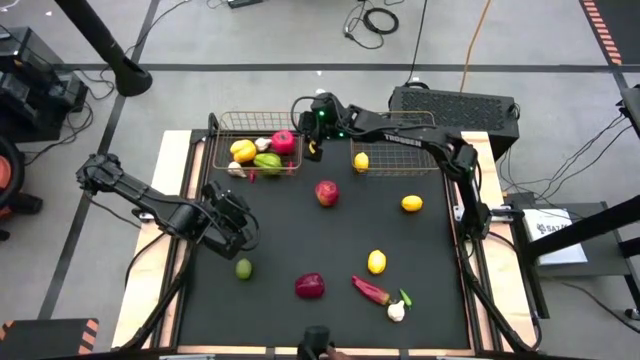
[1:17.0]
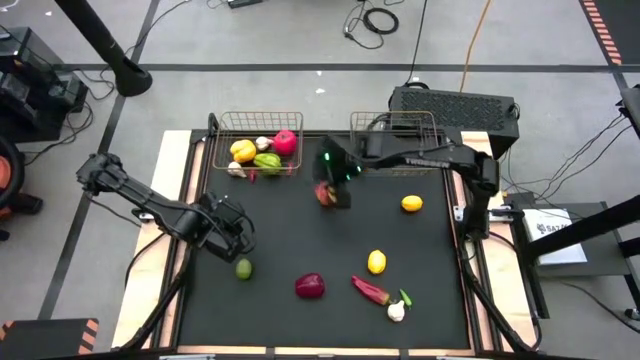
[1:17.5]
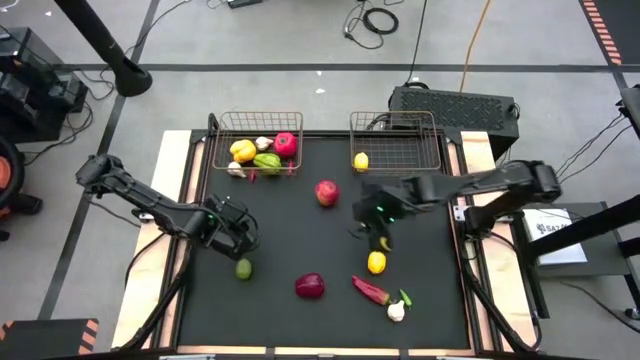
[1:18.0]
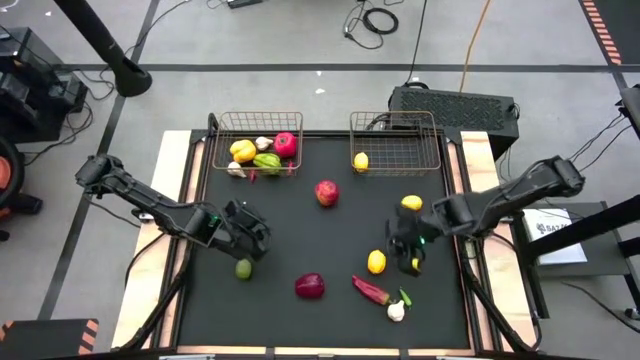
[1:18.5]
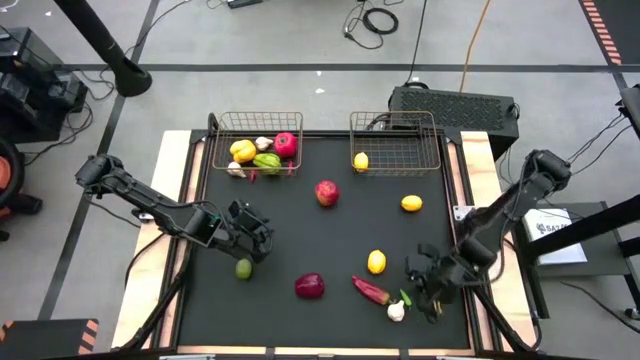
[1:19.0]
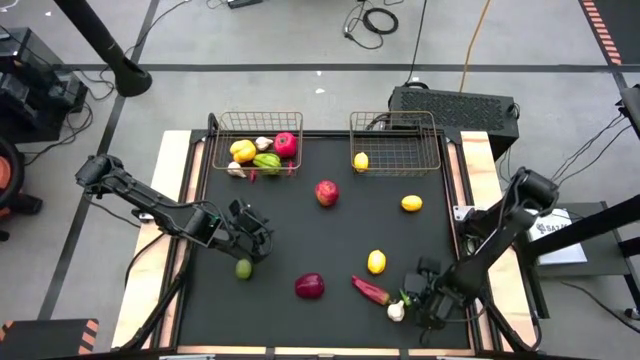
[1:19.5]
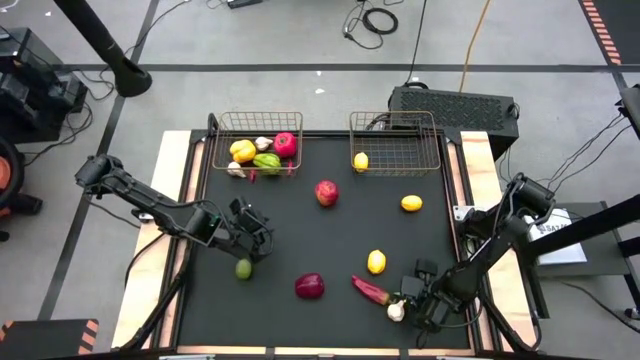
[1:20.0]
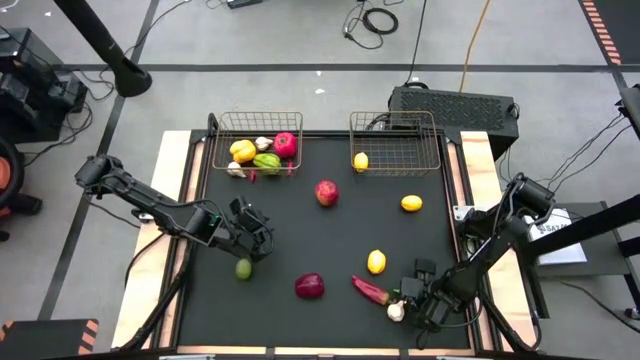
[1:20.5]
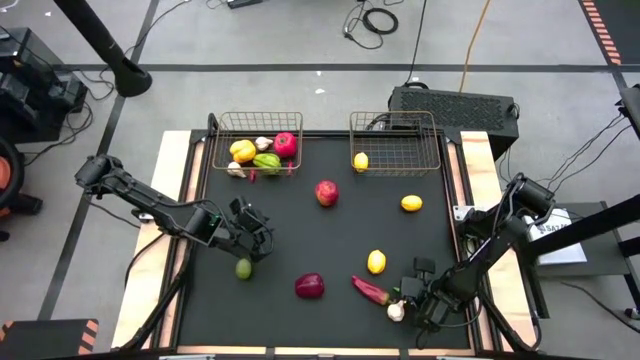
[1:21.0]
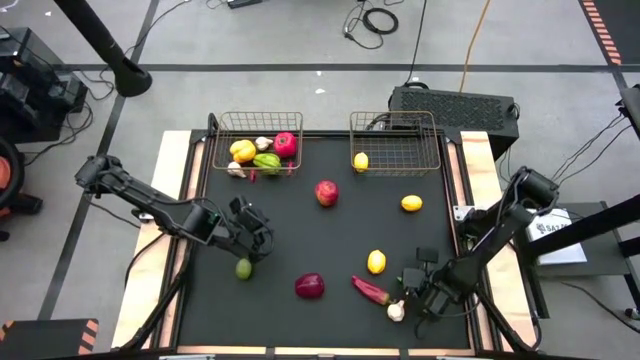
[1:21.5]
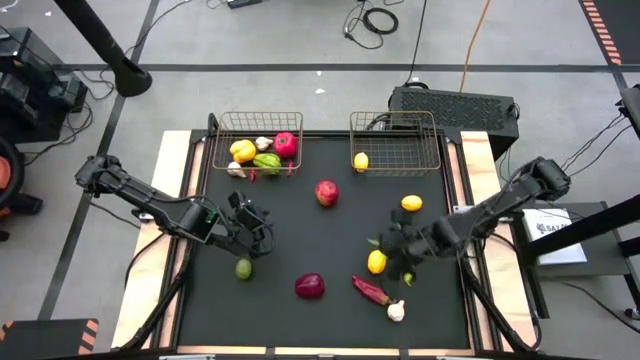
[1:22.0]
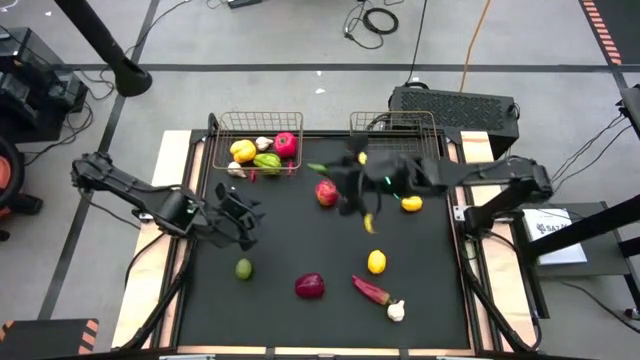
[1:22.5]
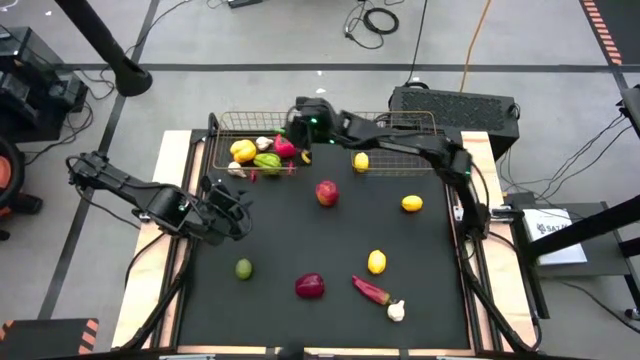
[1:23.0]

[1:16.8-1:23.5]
Task: Sort produce into baskets
Put the green chili pepper into the left wire basket

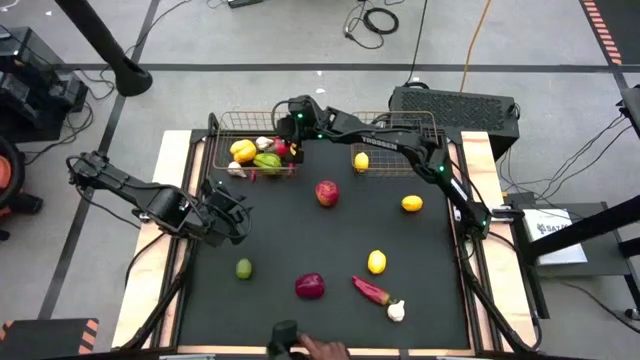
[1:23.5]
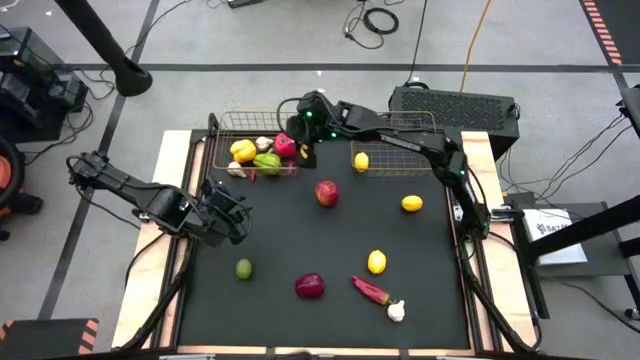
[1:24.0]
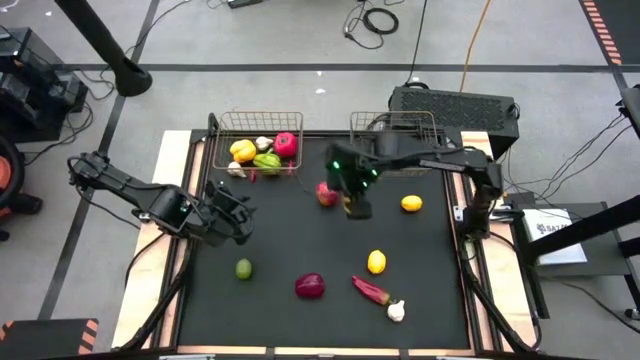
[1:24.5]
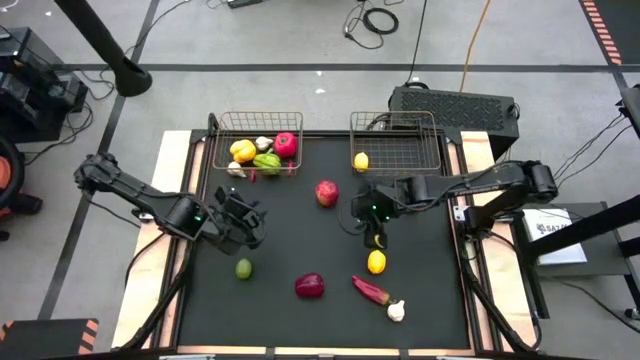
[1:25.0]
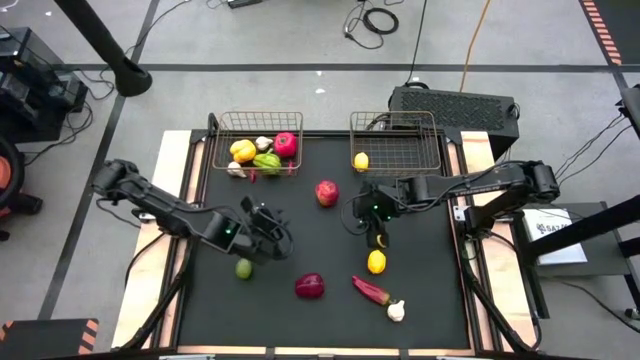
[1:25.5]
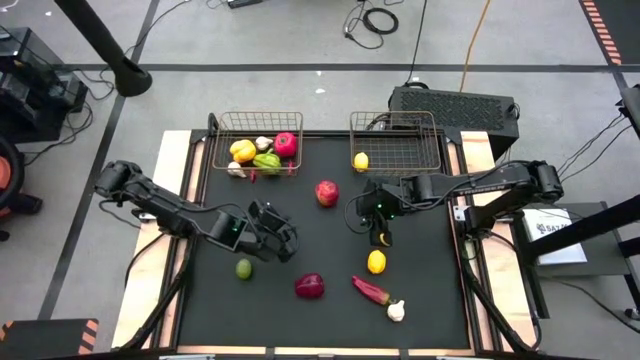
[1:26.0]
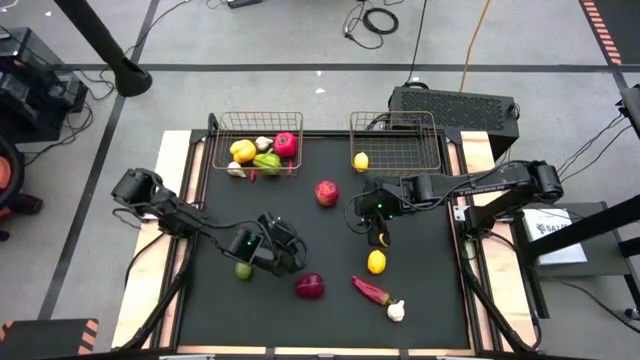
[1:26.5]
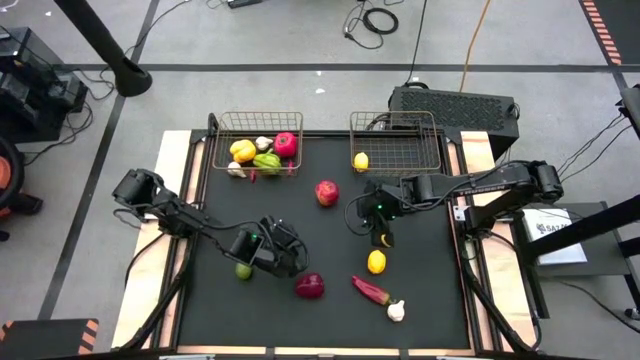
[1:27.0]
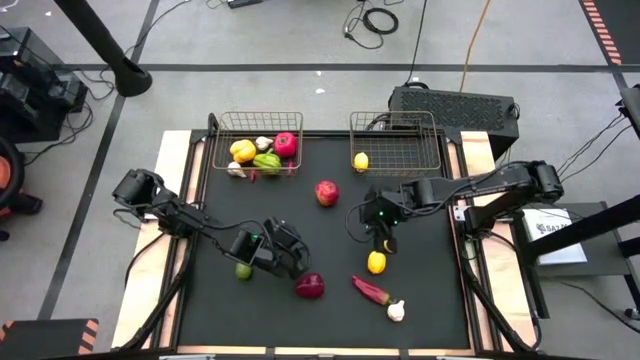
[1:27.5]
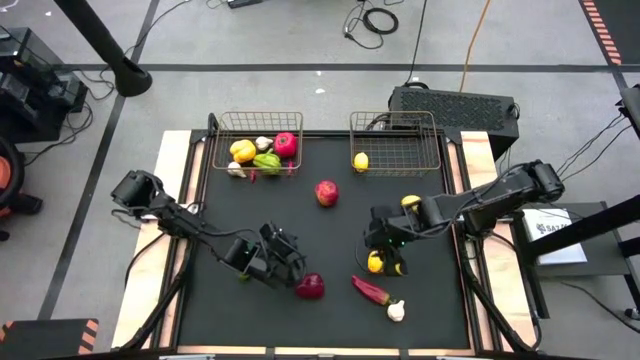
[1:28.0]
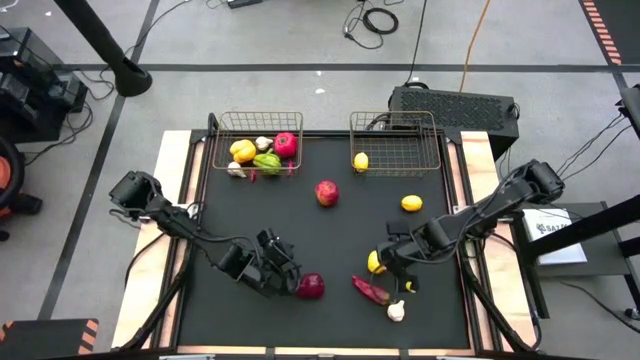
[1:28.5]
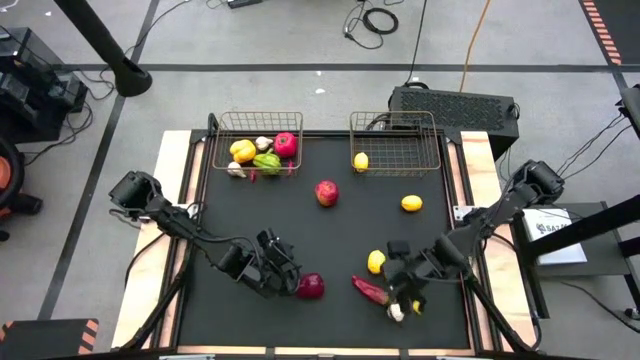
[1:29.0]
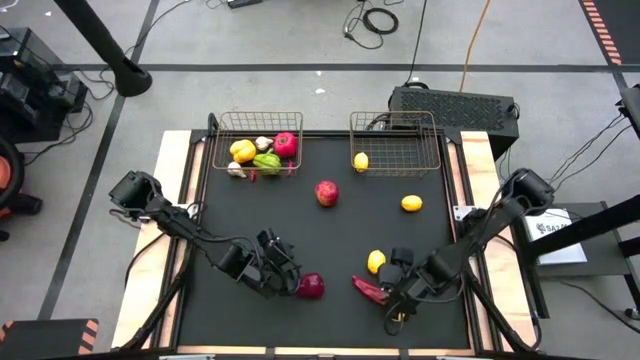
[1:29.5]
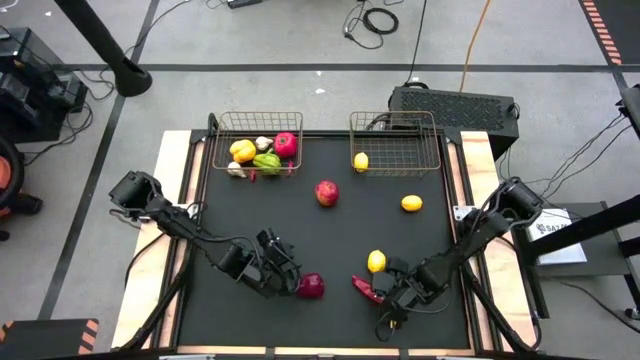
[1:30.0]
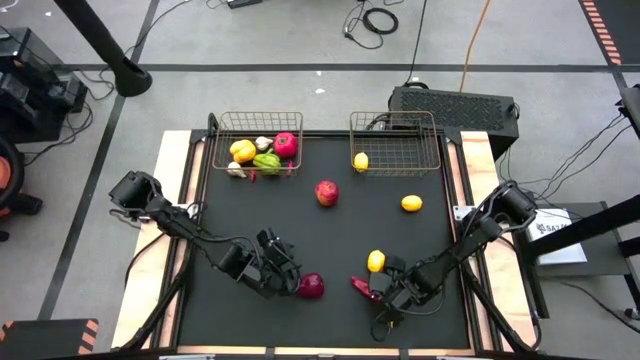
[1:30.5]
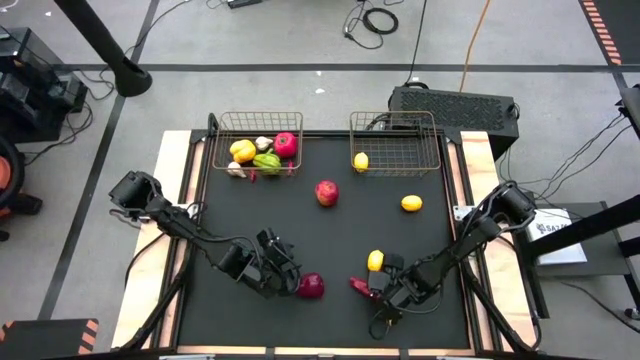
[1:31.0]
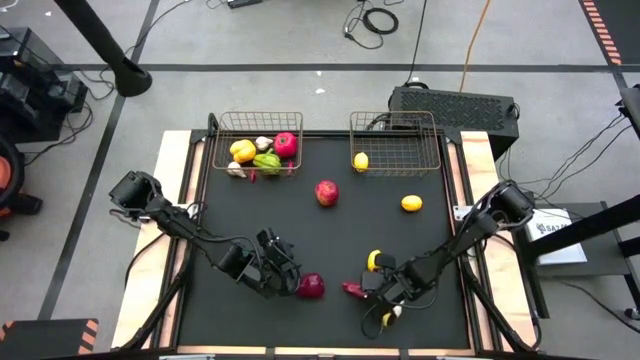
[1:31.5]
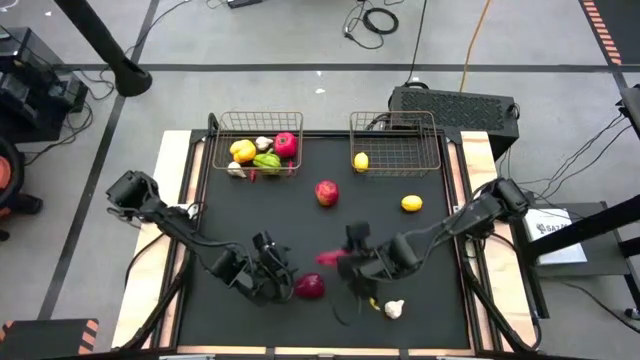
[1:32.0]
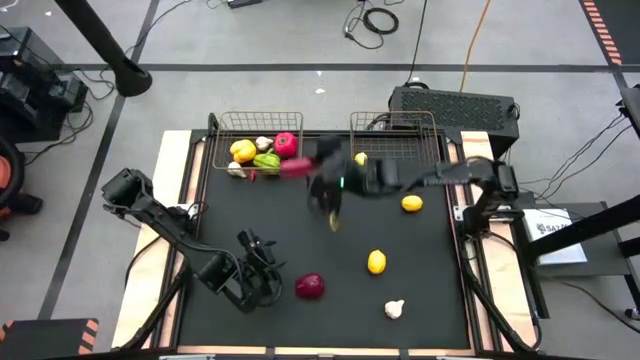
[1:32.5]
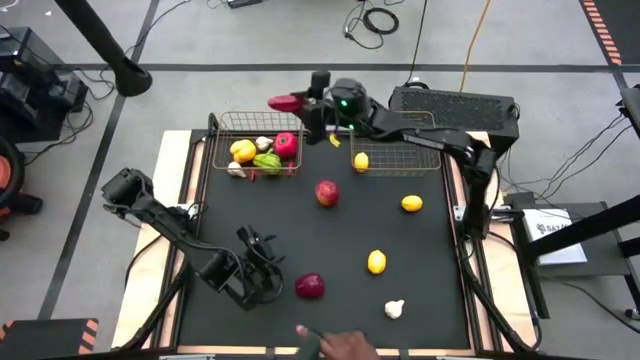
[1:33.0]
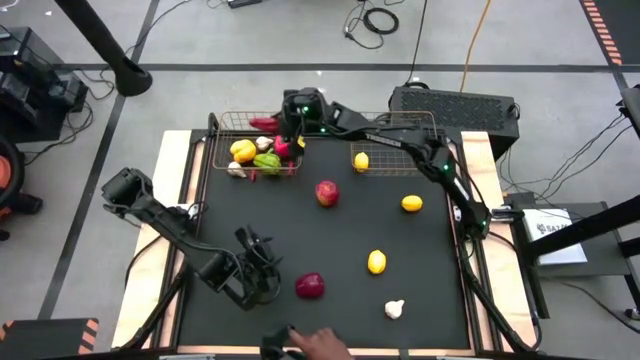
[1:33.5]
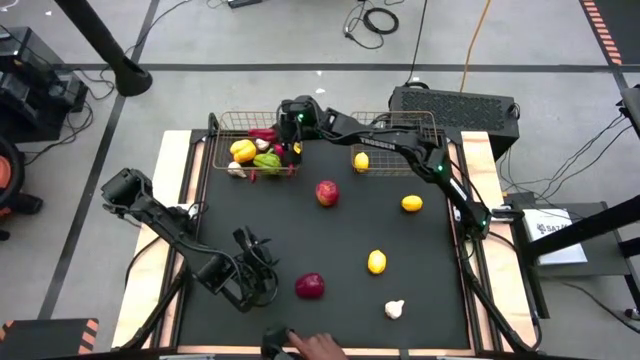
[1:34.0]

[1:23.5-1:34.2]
Put the red chili pepper into the left wire basket

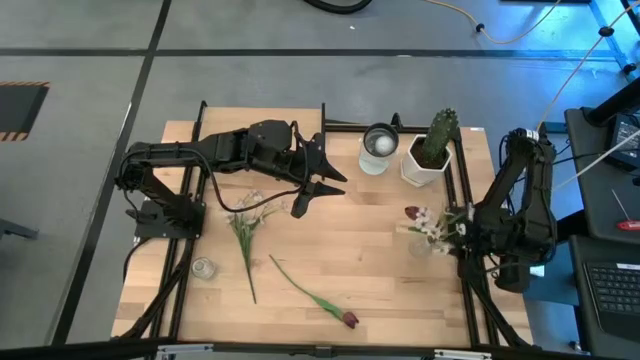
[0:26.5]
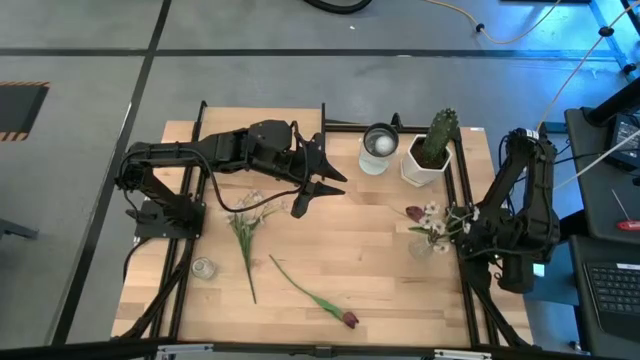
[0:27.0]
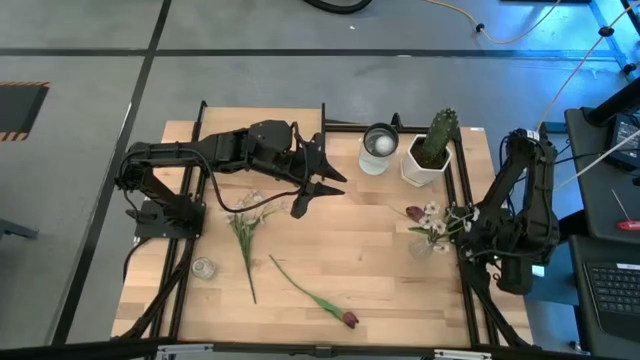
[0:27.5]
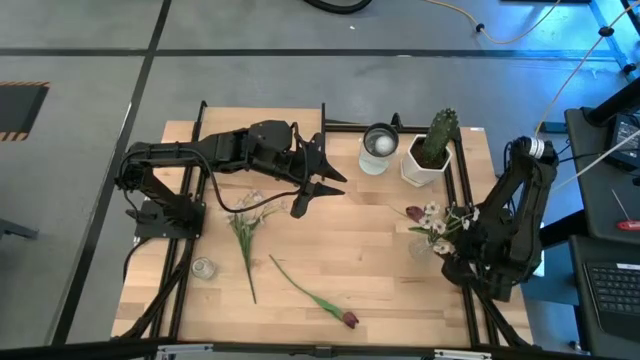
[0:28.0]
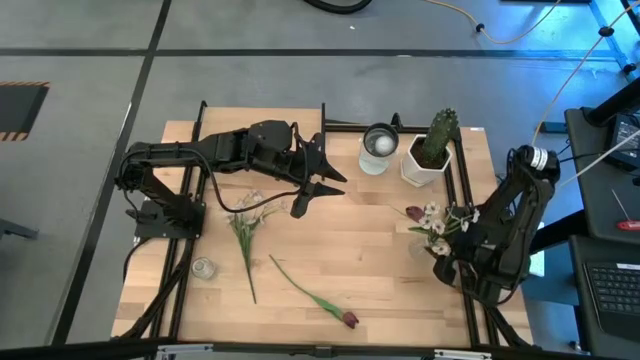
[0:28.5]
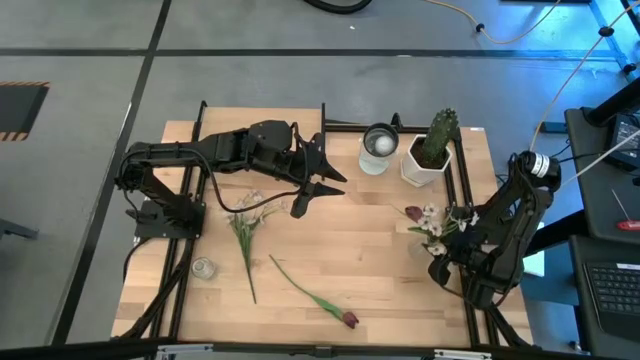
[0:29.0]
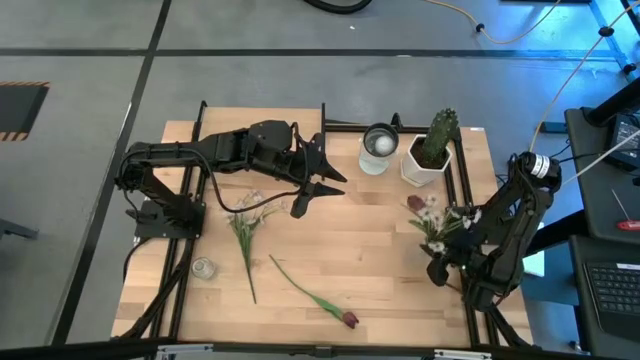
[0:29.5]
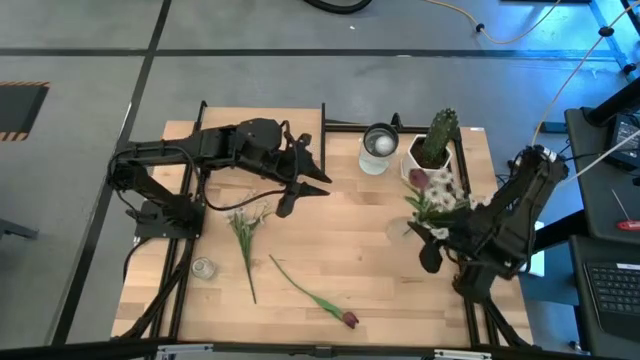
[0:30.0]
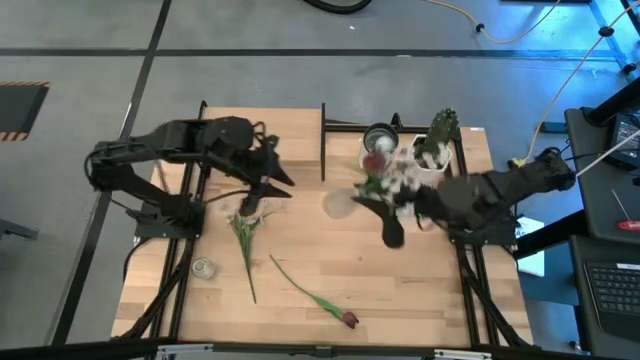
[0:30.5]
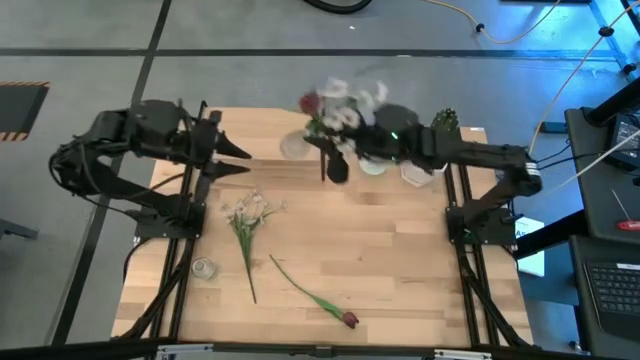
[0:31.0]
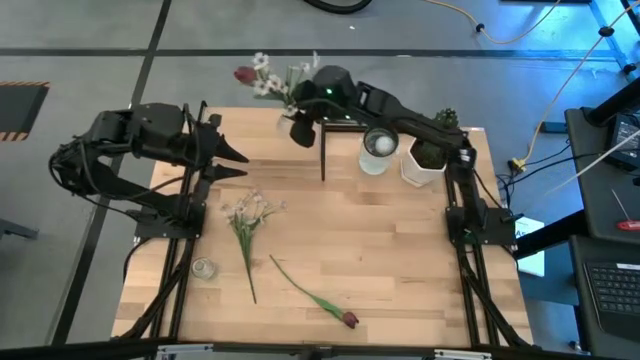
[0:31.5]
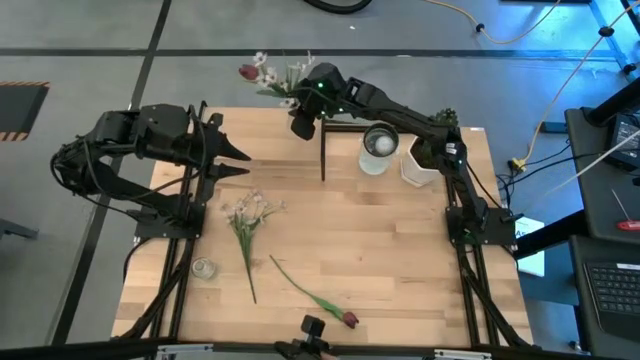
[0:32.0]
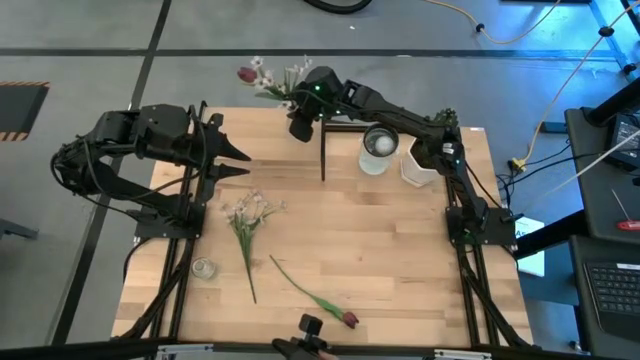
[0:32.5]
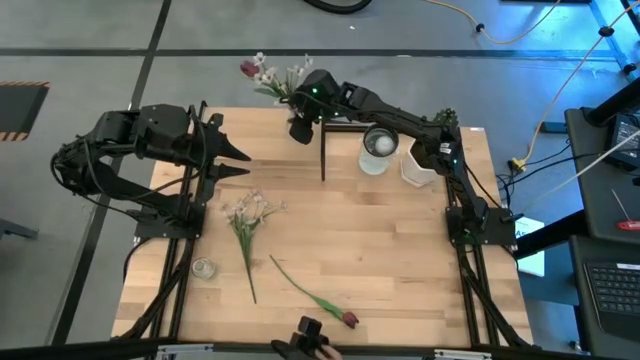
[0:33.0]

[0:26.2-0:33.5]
Task: Pick and place flowers into a vace then onto a shelf
Put the right transparent vase with flowers on the shelf
